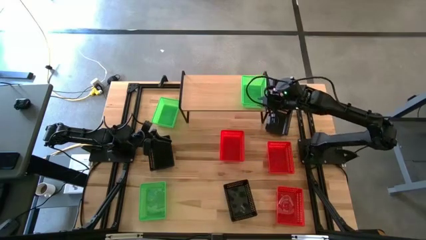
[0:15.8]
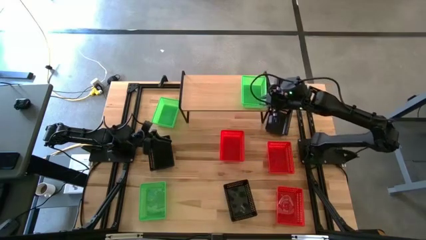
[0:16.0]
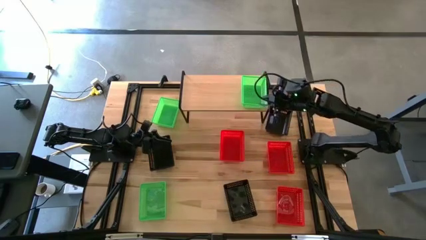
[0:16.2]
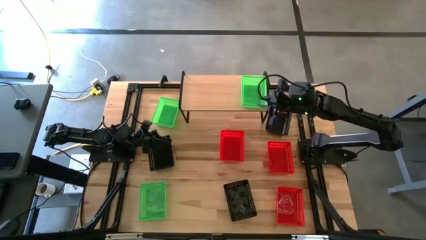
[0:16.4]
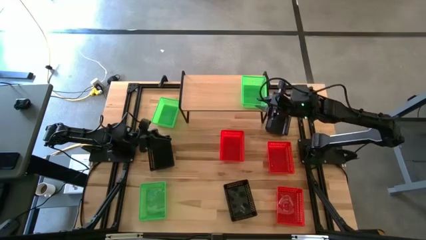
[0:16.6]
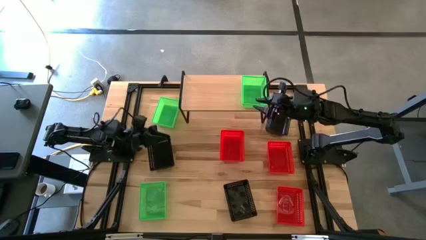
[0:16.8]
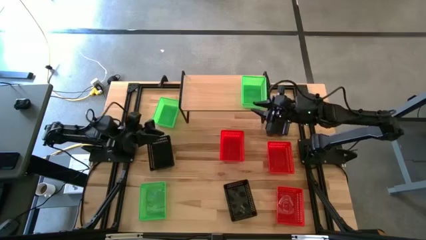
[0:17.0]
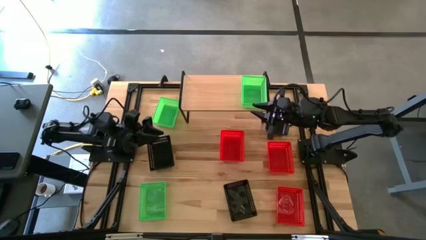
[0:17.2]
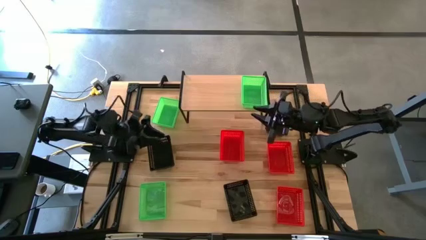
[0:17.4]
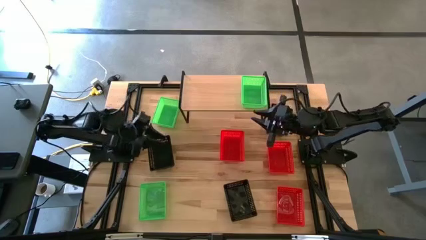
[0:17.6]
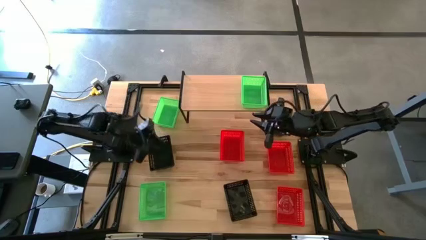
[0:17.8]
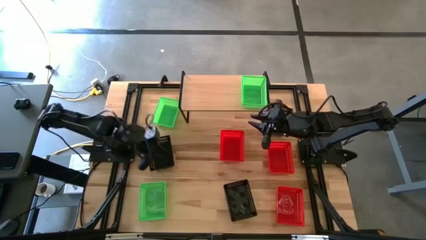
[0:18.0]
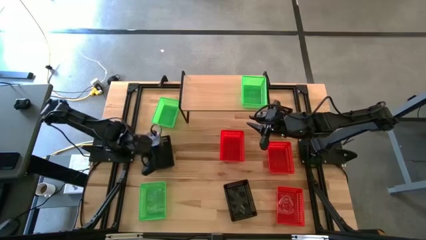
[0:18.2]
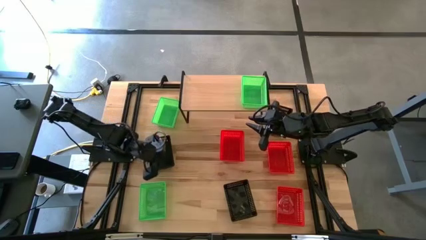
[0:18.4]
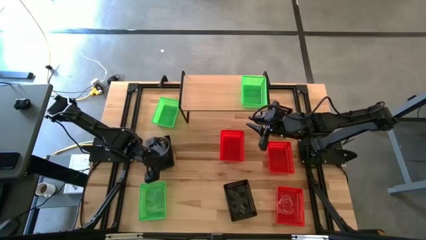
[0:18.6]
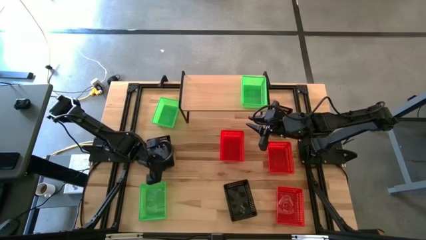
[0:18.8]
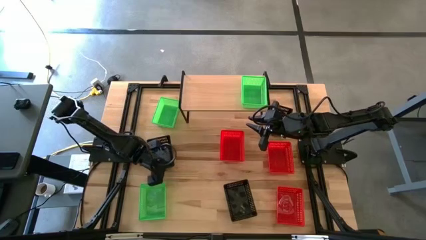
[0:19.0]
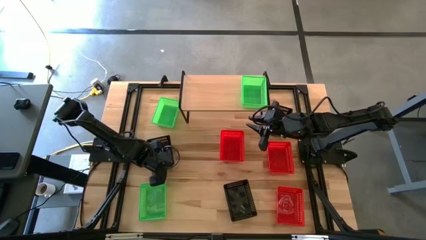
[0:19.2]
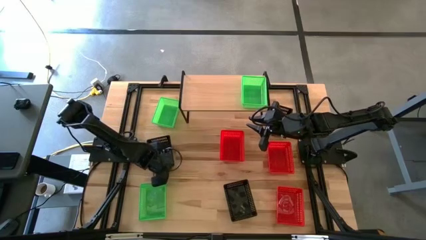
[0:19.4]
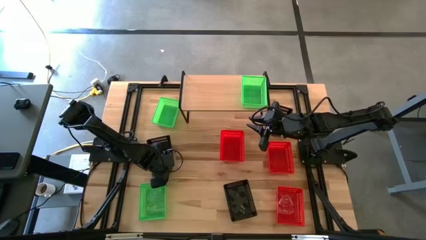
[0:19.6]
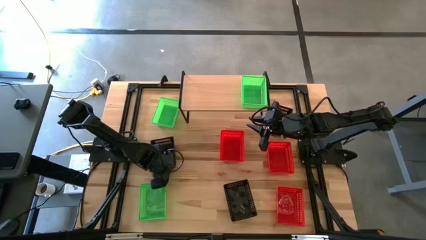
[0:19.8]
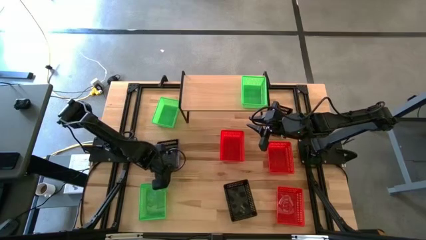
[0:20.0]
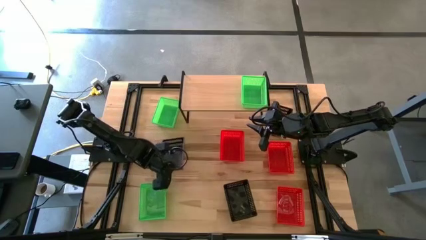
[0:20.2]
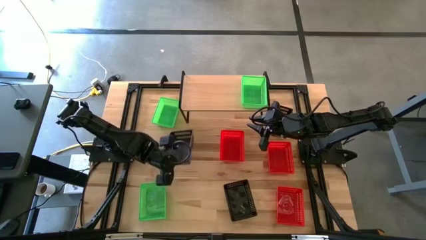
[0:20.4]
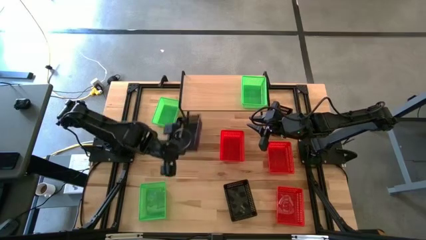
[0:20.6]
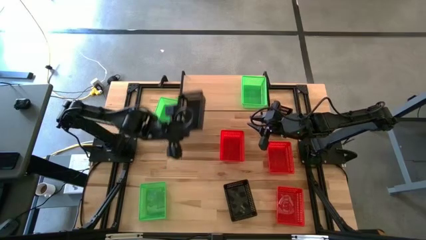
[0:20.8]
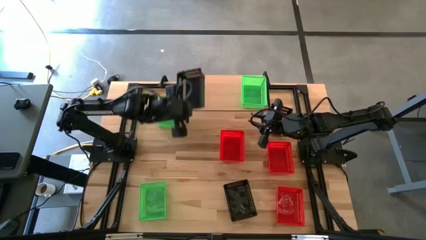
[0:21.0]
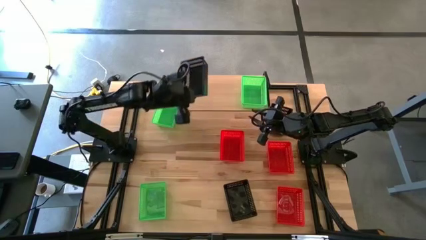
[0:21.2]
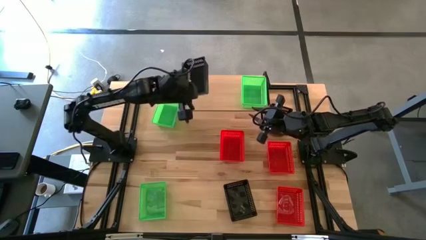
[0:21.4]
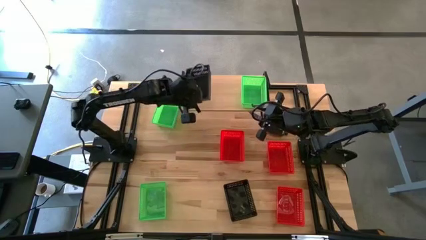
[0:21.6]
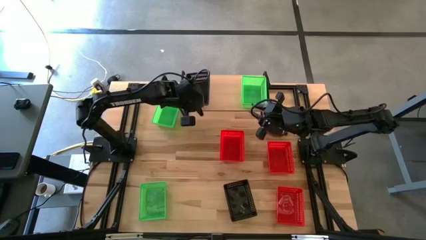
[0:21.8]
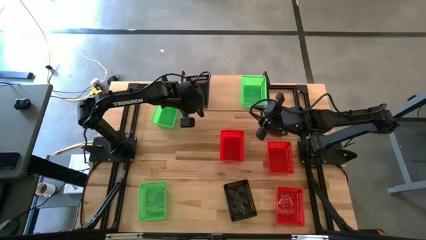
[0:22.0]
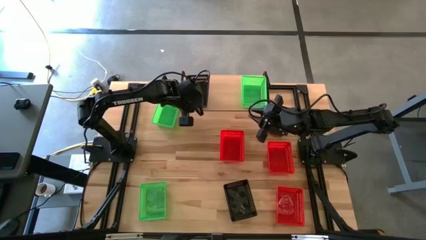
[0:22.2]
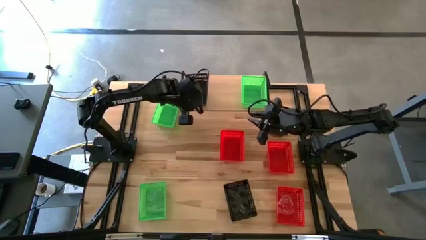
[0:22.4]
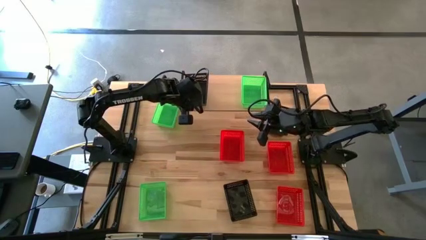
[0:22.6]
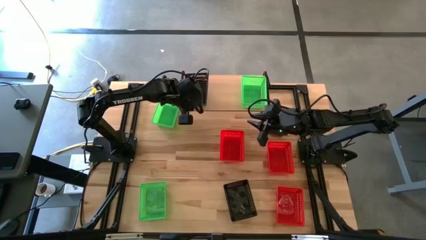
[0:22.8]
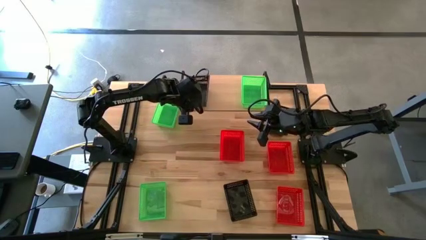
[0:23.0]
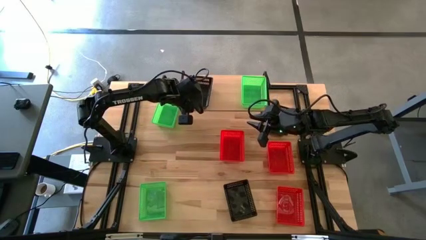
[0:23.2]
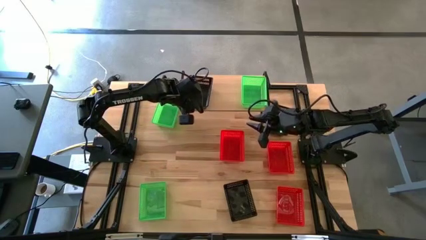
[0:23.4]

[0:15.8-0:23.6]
Task: Stack baskets on shelf by color
Put the middle left black bin on the shelf

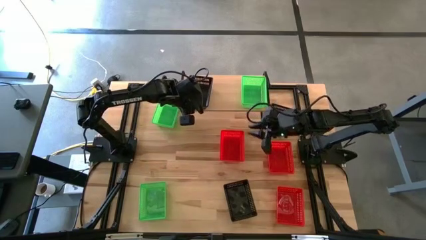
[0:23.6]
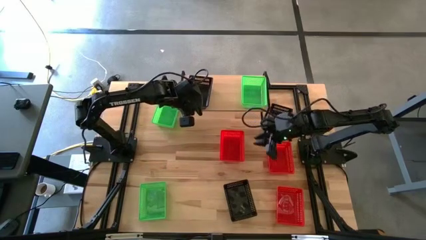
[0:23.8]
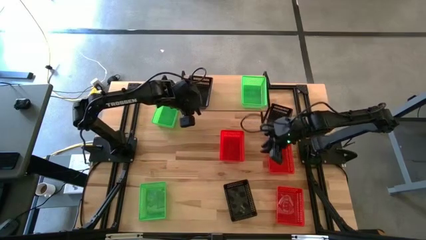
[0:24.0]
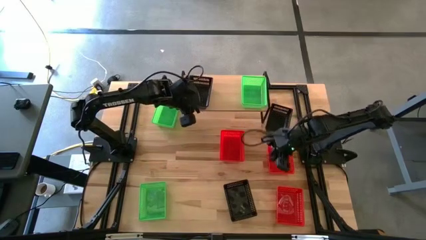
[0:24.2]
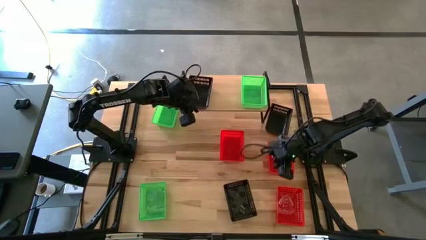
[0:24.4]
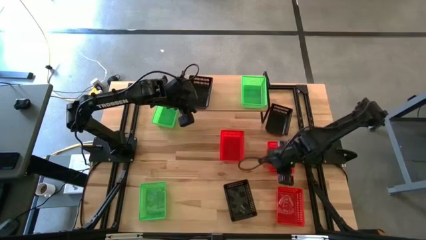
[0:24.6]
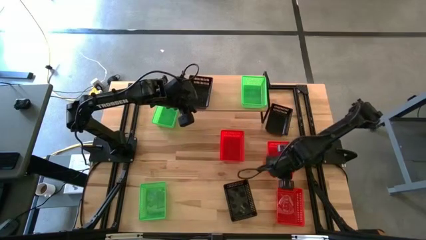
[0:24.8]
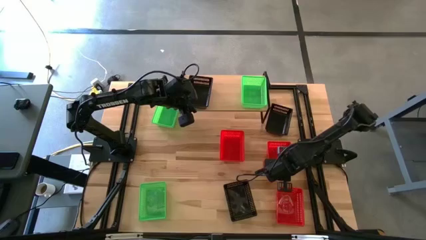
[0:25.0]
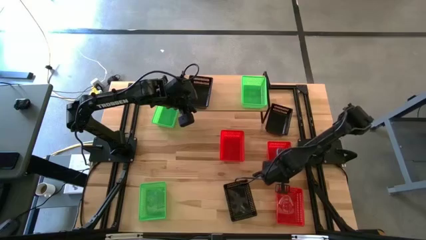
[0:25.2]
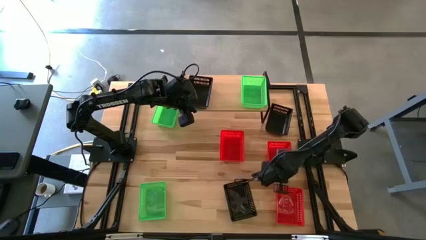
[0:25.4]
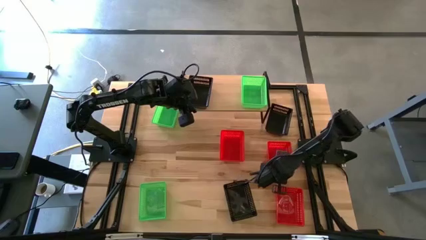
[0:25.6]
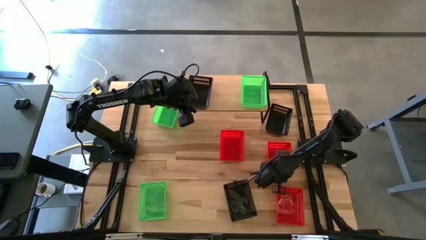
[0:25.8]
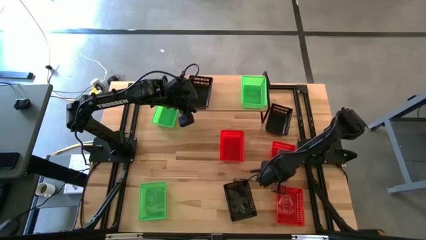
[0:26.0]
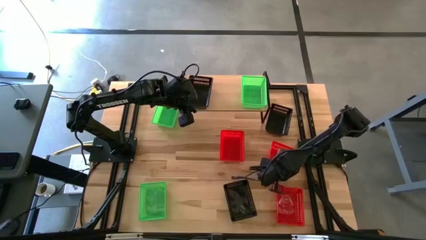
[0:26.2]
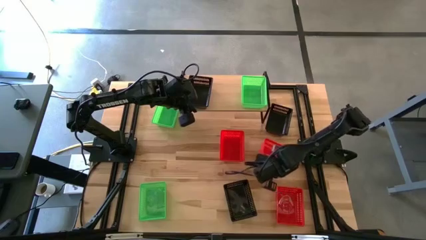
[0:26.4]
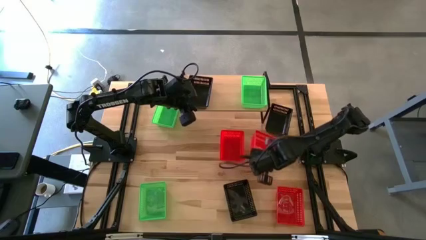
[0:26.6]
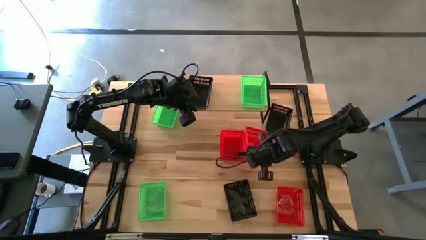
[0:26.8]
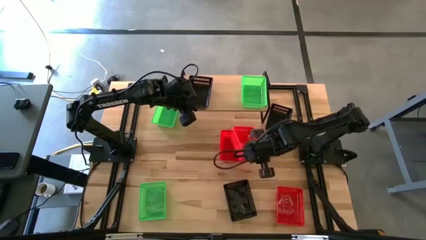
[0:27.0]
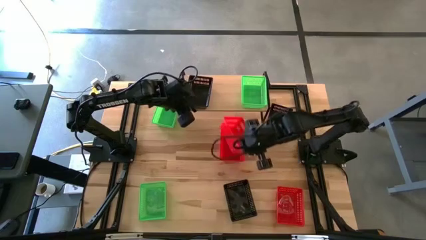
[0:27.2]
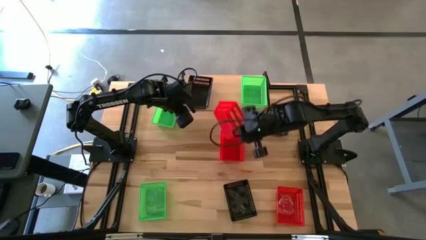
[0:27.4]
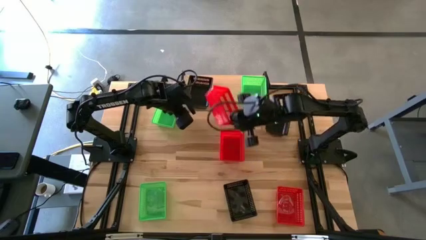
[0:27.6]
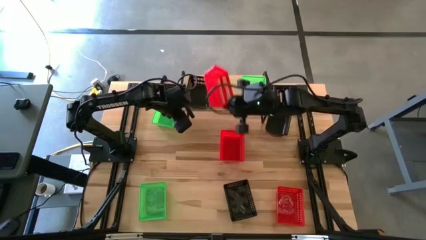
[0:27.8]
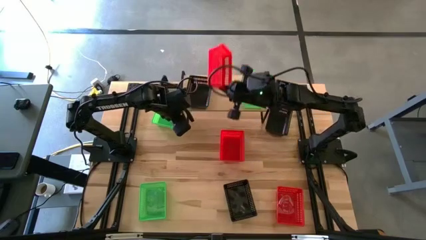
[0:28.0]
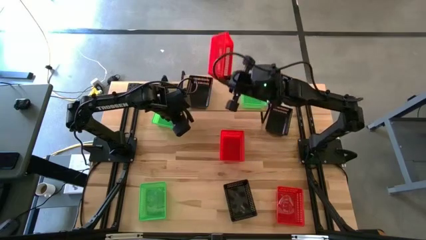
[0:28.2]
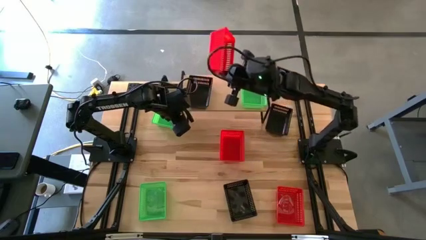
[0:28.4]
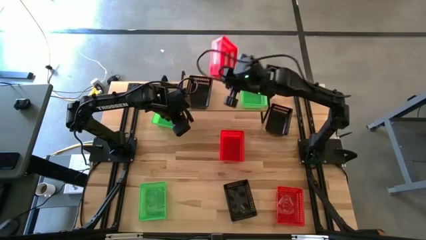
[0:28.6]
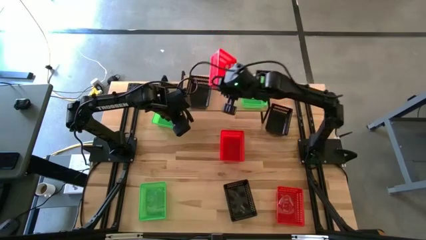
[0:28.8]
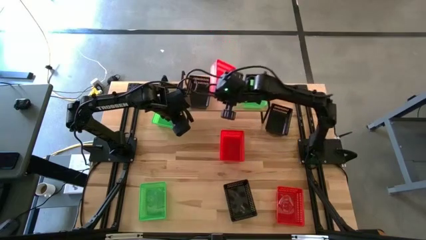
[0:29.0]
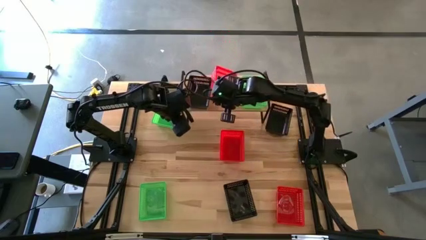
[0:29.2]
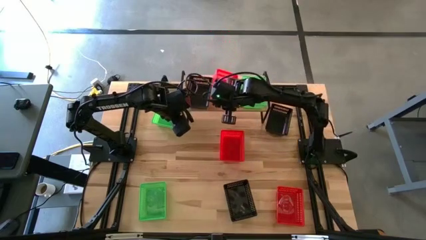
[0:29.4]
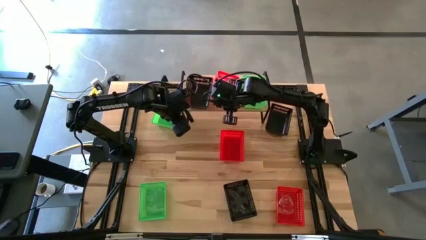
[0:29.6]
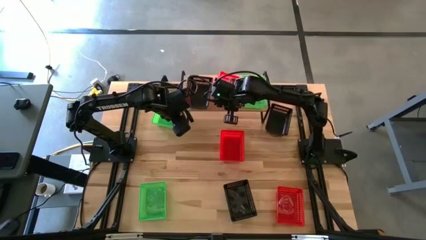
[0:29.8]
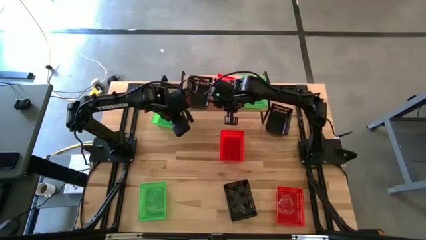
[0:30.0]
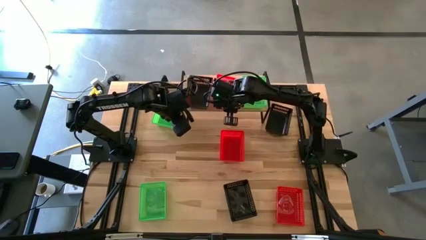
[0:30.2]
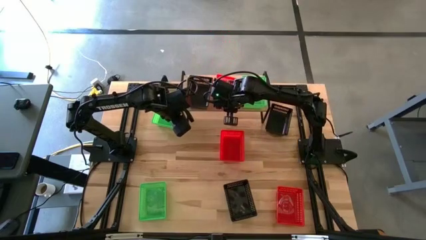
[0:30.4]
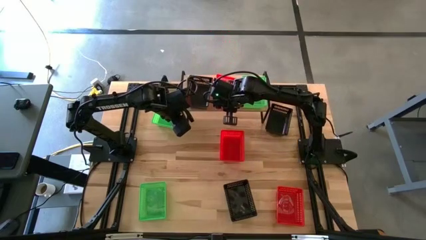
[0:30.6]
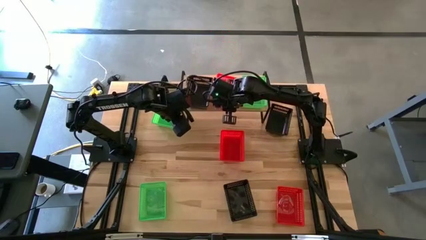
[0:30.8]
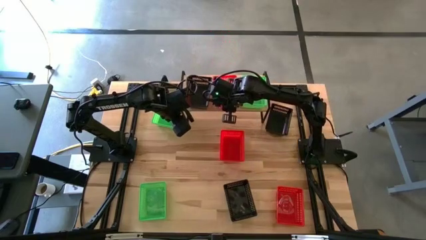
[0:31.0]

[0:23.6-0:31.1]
Put the top right red bin on the shelf
